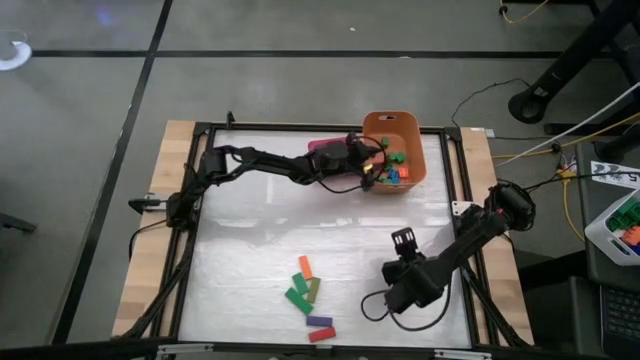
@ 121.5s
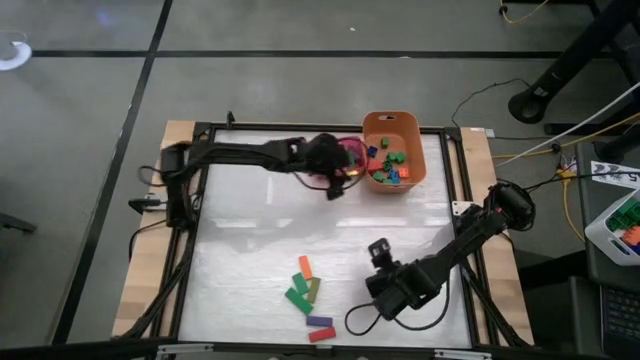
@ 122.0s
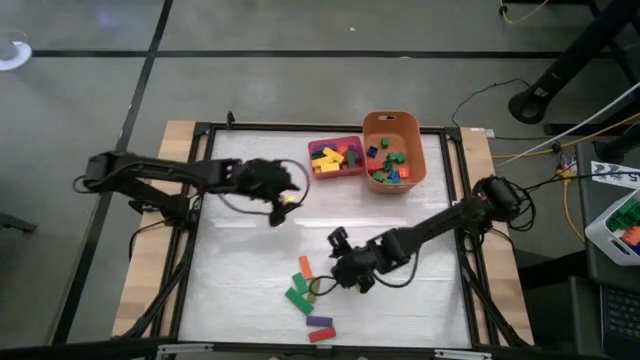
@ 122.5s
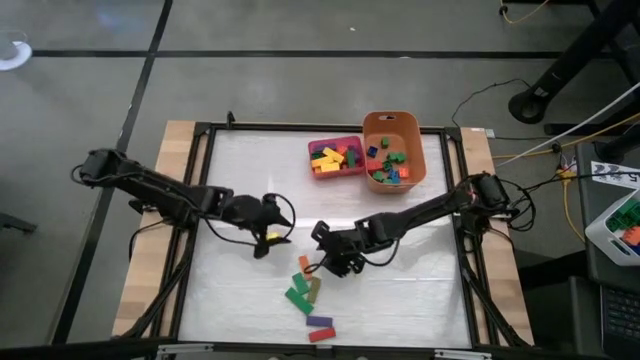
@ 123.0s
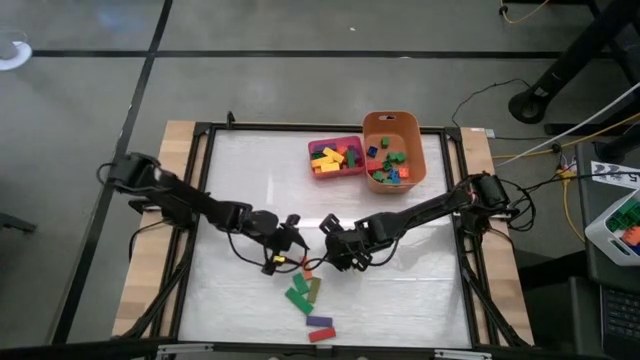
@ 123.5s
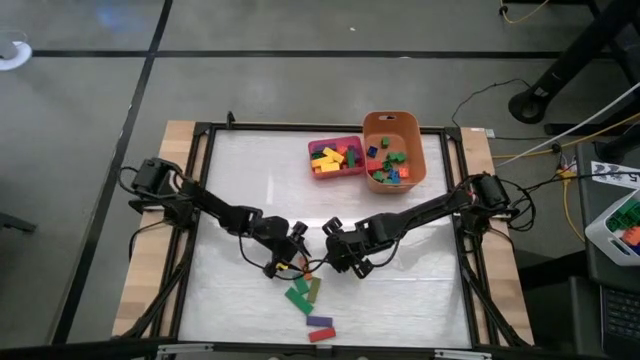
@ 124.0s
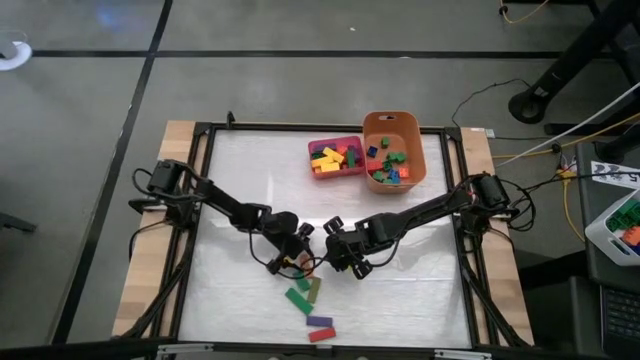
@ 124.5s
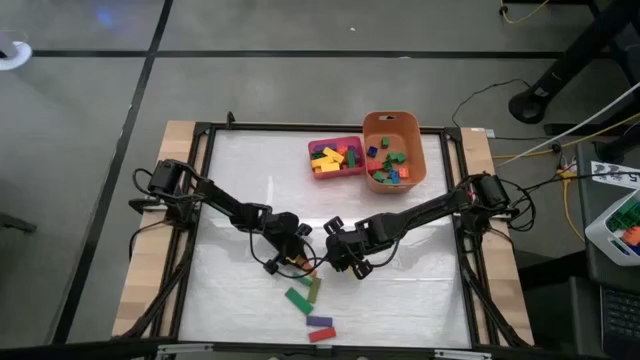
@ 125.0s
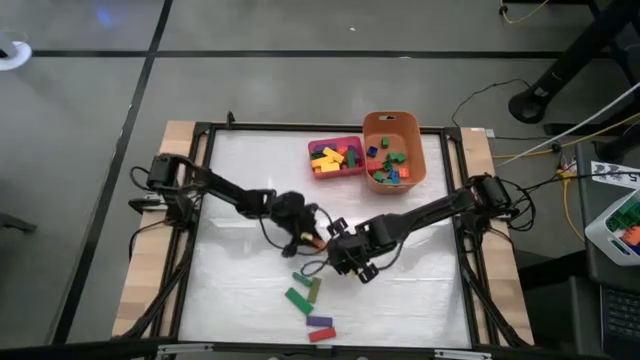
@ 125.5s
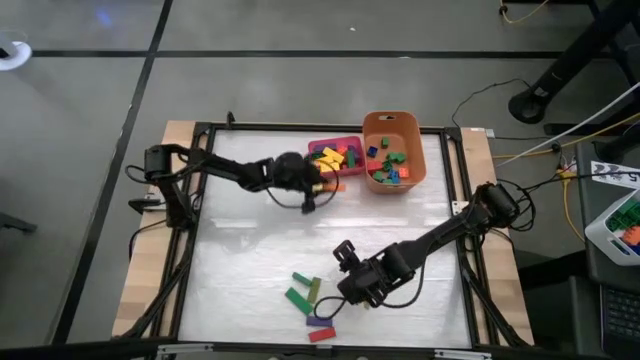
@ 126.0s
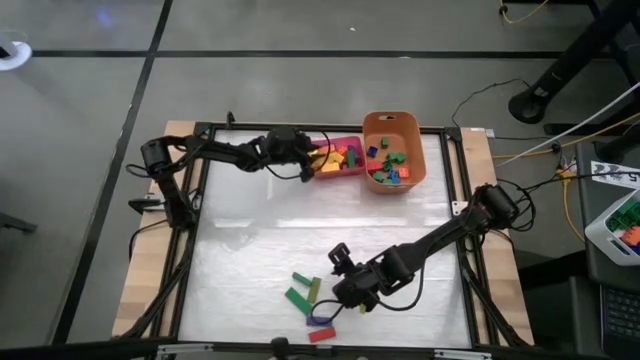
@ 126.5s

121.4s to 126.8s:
Task: Sort blocks by size
Put the large orange block into the pink bin

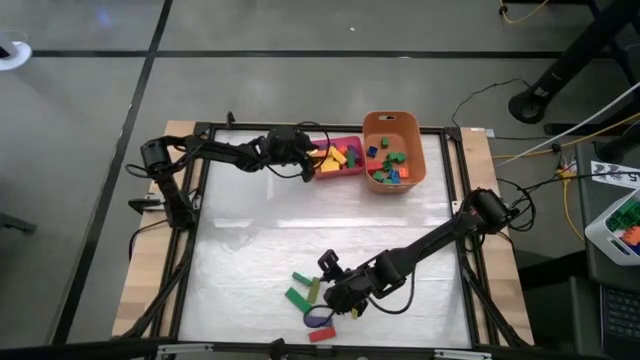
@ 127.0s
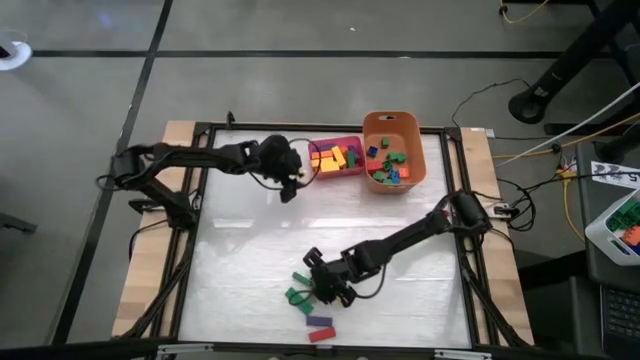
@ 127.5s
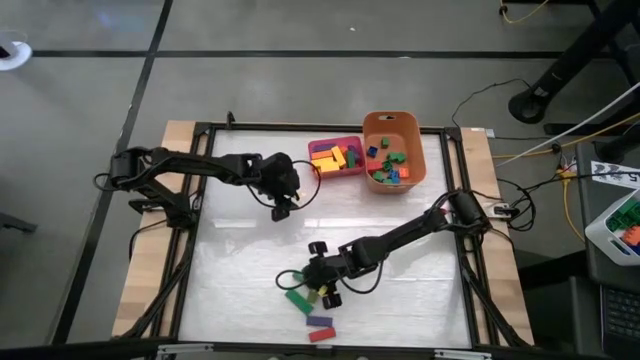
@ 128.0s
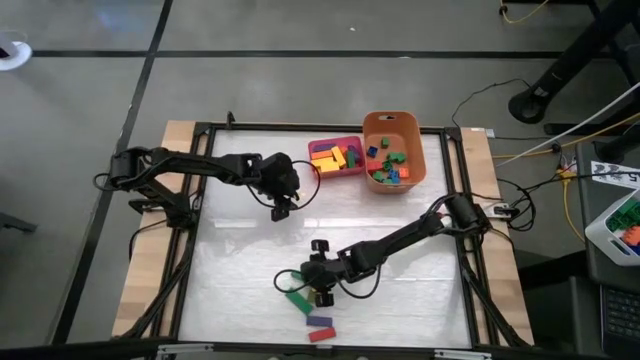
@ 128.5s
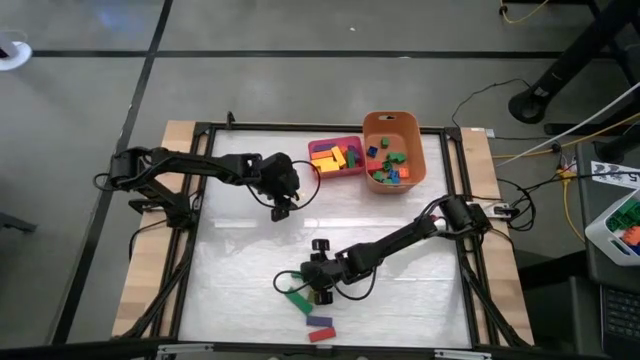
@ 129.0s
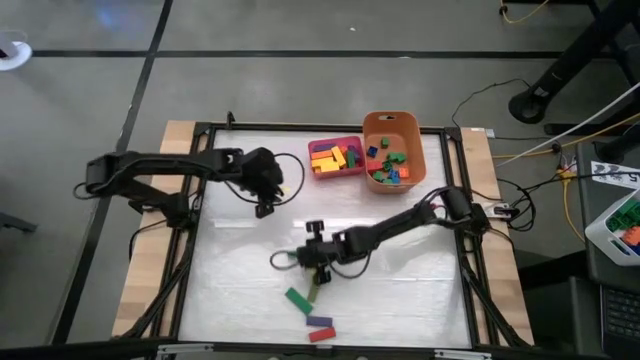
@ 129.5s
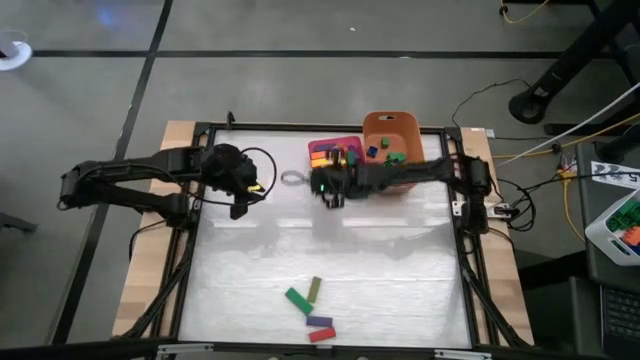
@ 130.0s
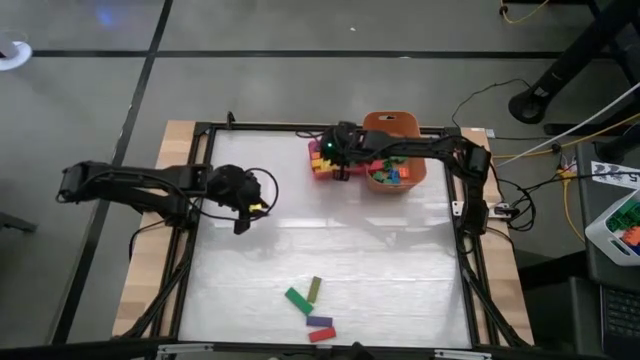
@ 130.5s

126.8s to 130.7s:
Put the large green block into the pink bin

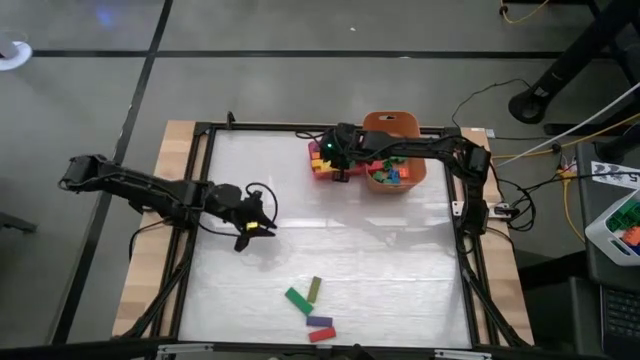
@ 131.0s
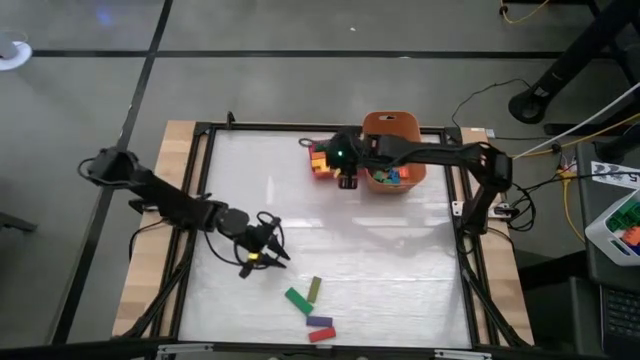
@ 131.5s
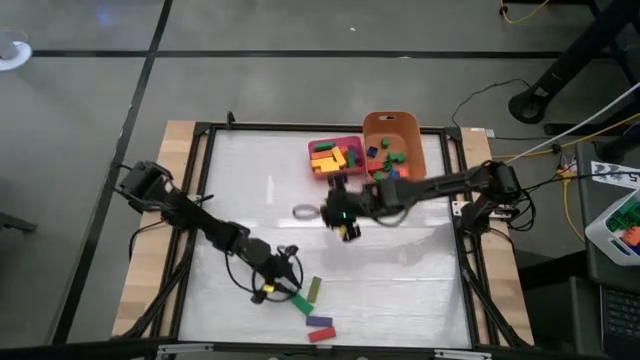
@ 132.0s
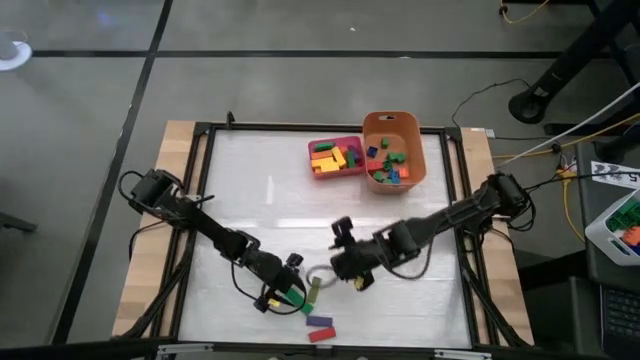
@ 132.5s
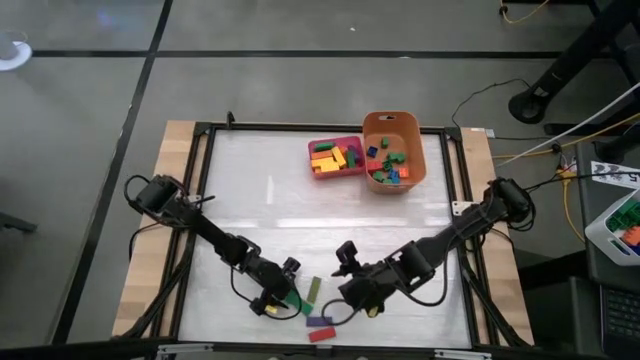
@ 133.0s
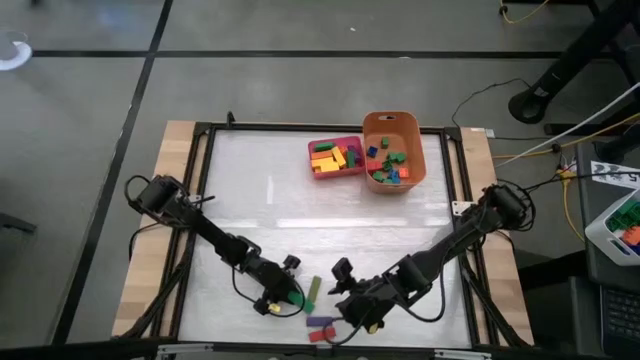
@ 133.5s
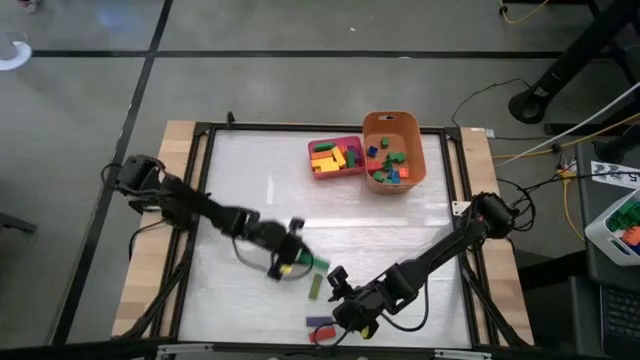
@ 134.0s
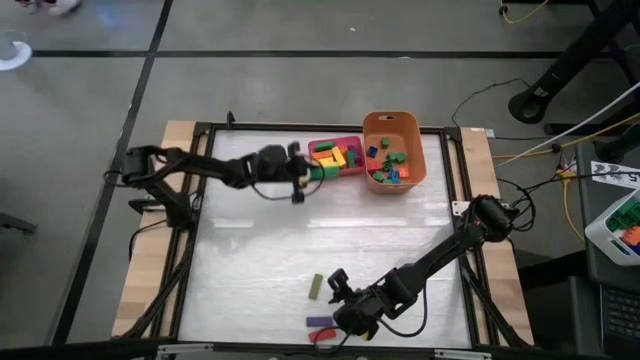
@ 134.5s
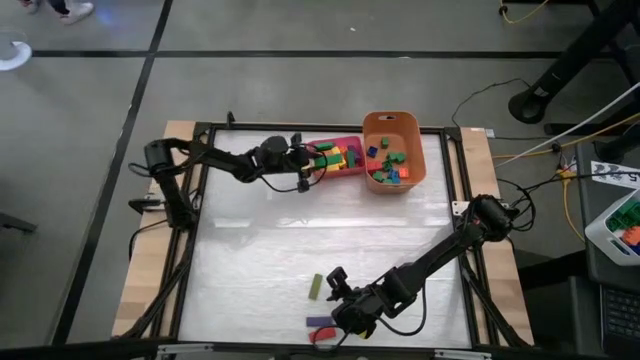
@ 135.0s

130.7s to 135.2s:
Put the large green block into the pink bin

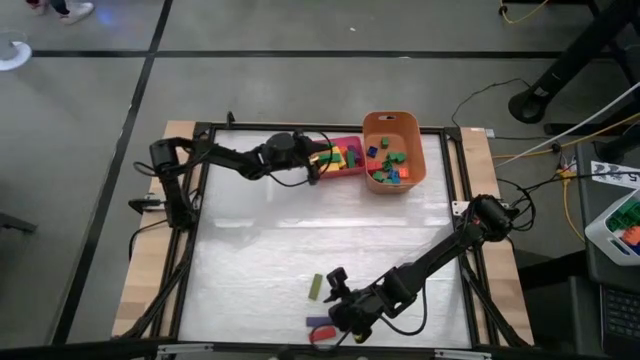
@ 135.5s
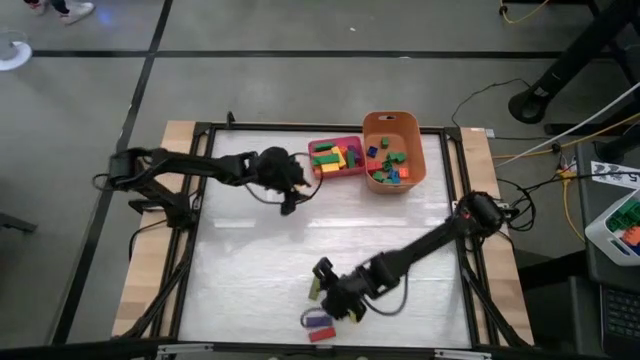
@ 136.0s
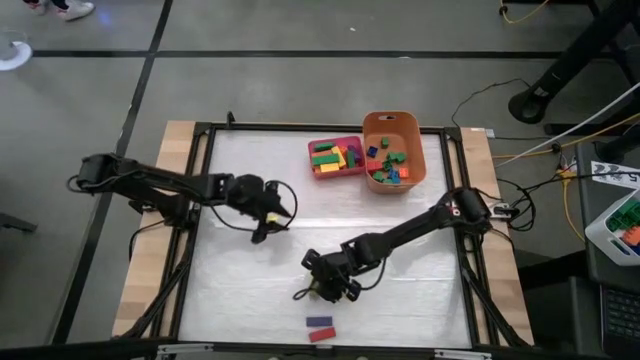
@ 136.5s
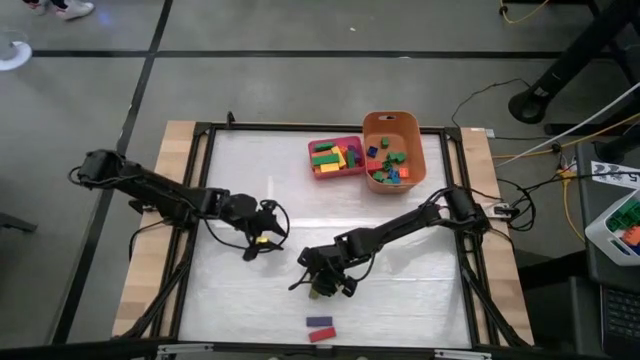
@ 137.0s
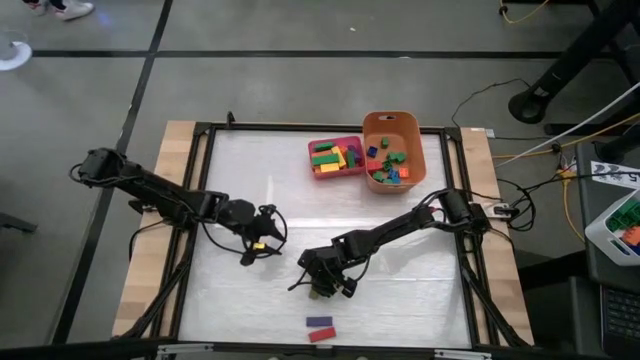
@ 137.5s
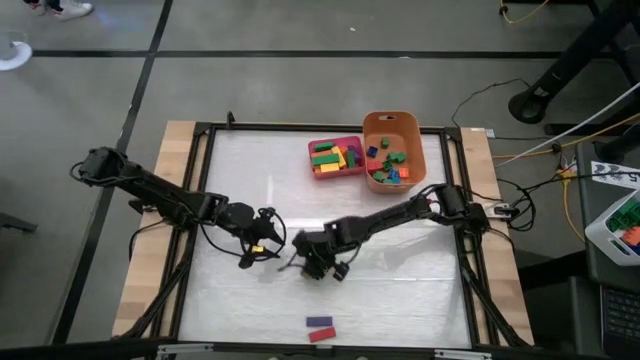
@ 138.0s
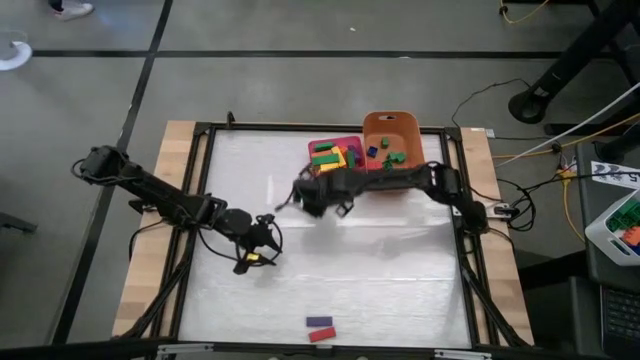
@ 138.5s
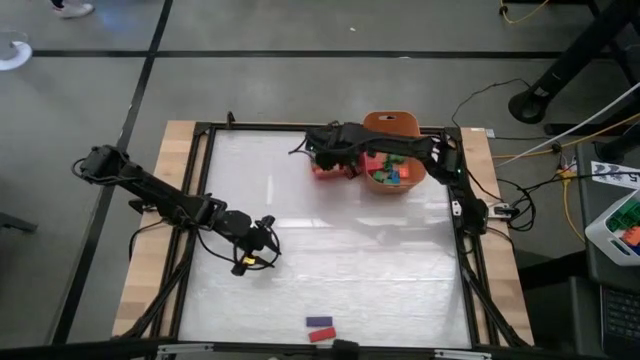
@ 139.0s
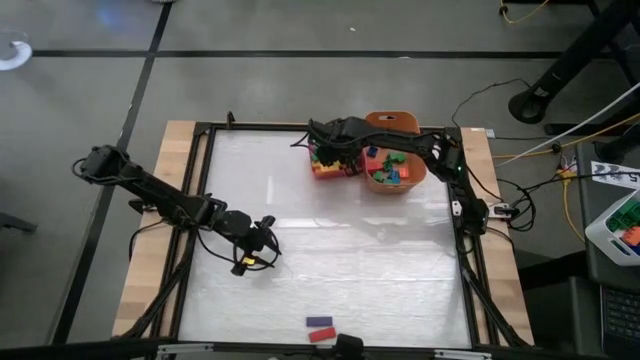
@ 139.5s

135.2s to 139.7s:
Put the large light green block into the pink bin

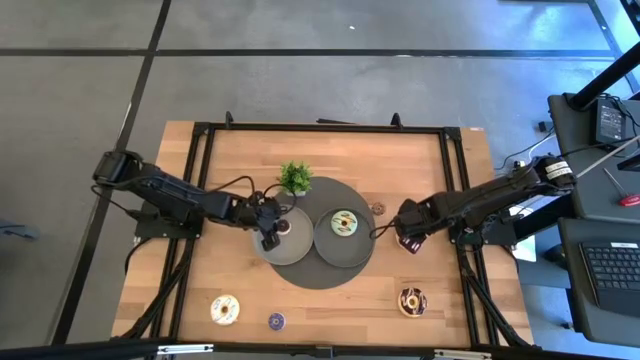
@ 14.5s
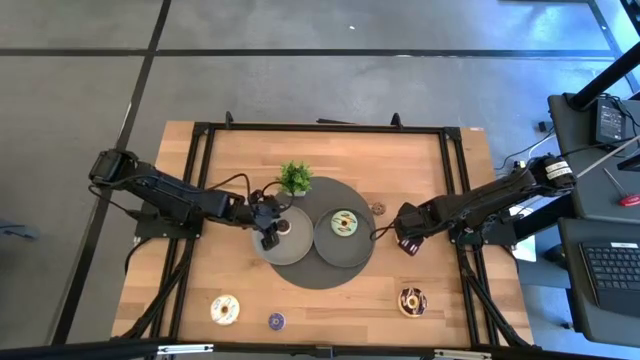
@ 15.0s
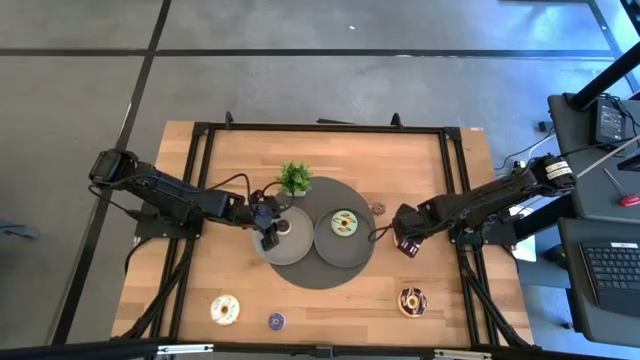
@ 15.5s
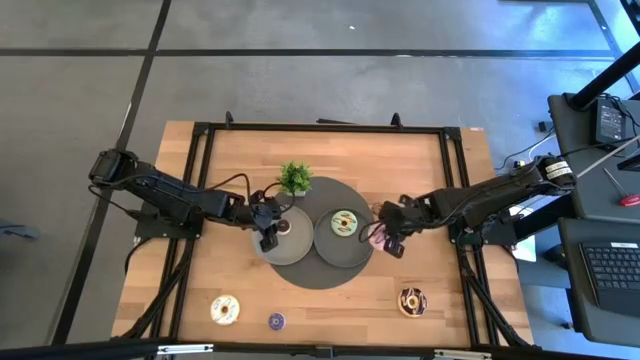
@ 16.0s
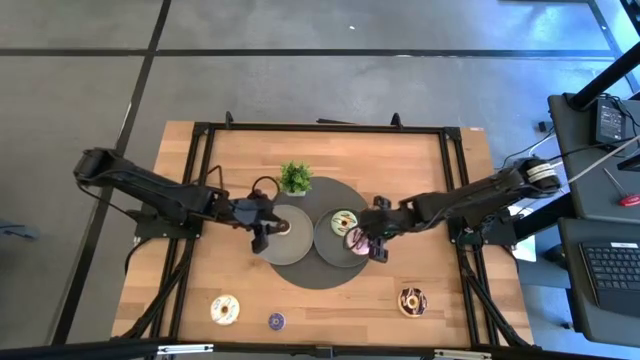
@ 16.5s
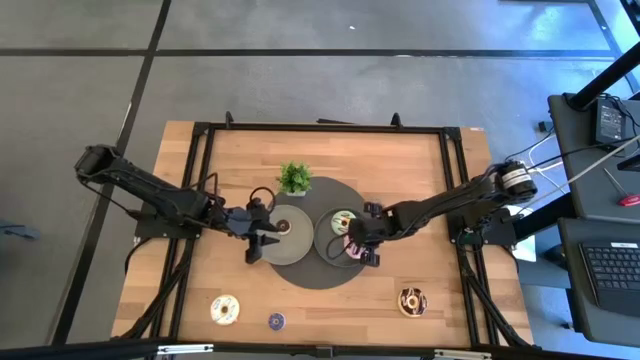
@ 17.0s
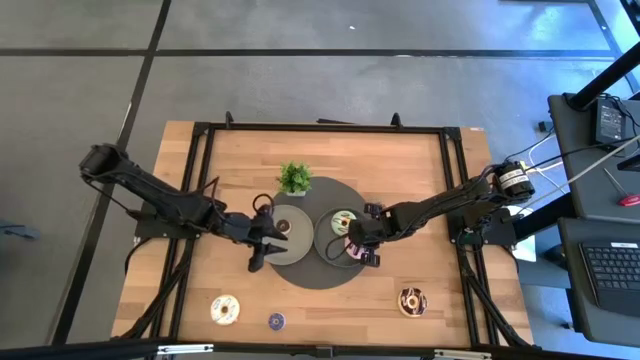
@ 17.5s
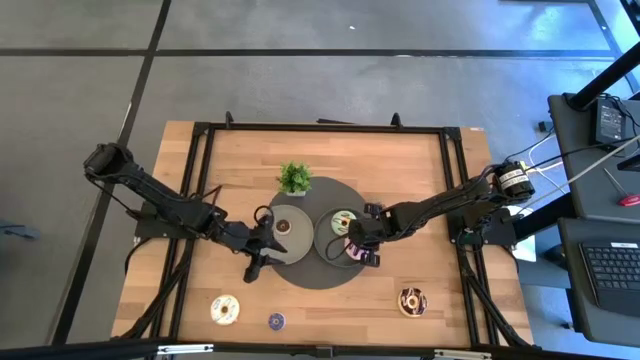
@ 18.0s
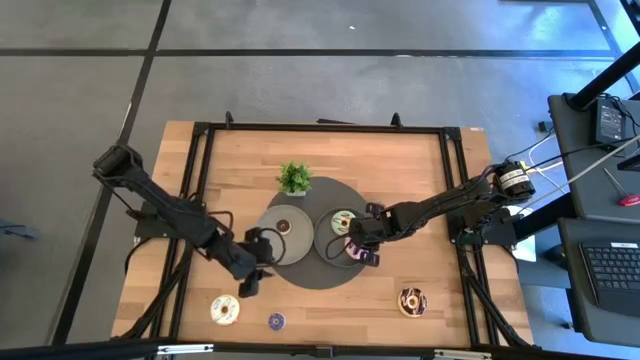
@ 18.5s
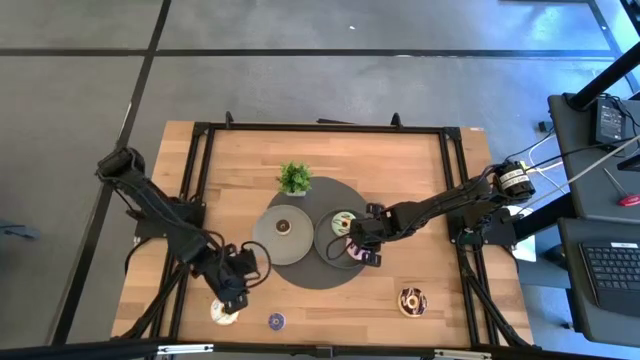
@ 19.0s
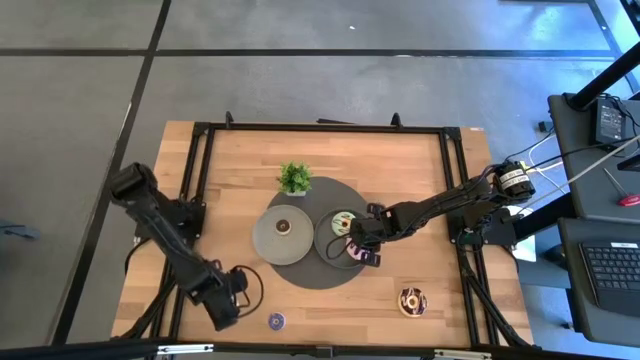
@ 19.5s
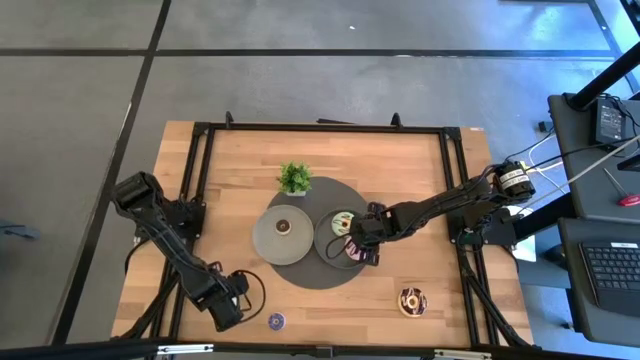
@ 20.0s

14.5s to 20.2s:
Task: Pick & Place donuts
Put the large purple donut on the black plate
